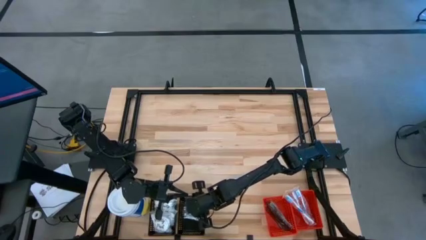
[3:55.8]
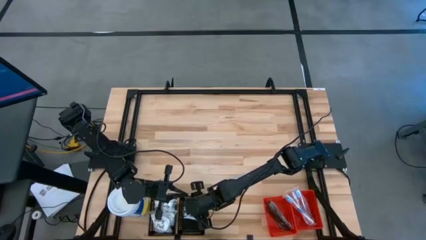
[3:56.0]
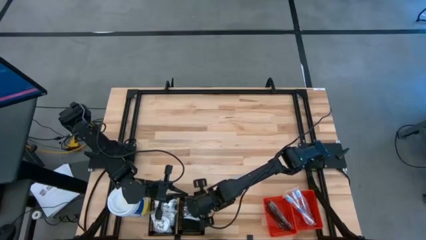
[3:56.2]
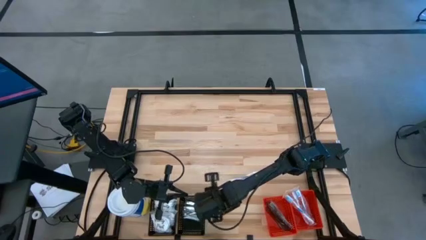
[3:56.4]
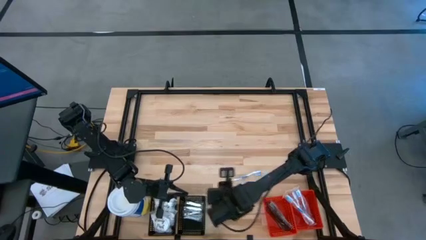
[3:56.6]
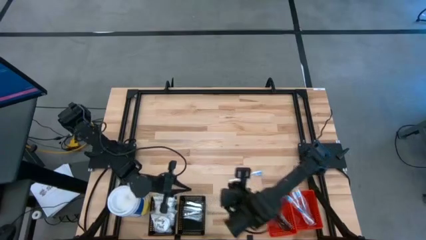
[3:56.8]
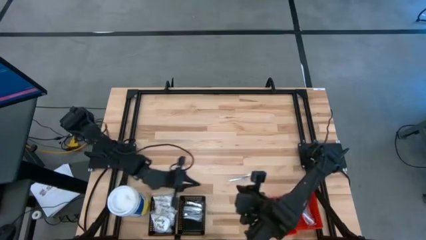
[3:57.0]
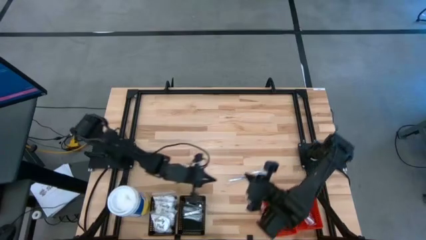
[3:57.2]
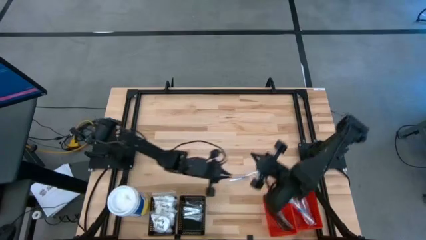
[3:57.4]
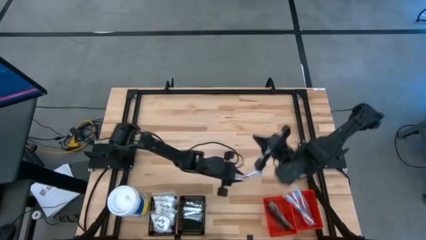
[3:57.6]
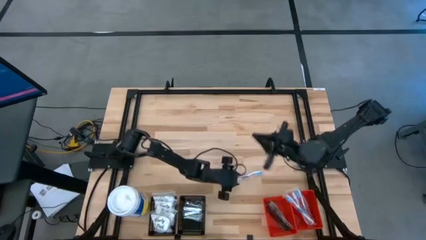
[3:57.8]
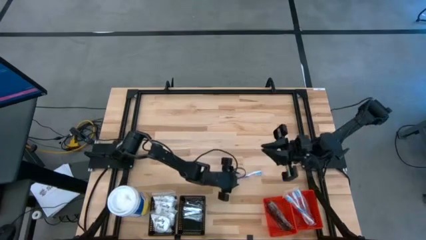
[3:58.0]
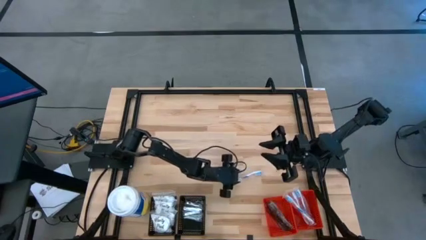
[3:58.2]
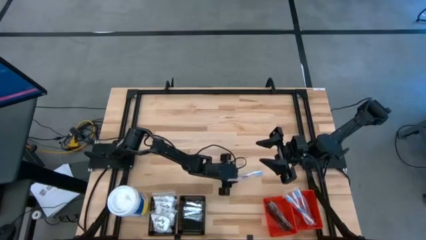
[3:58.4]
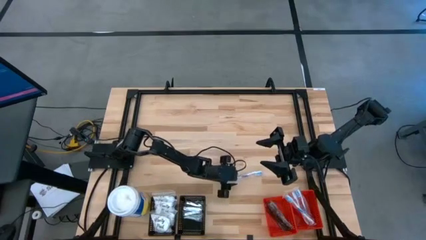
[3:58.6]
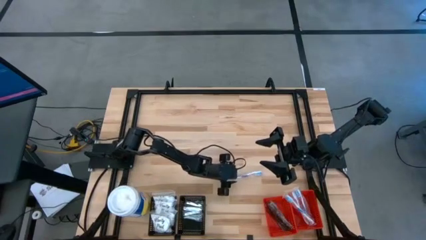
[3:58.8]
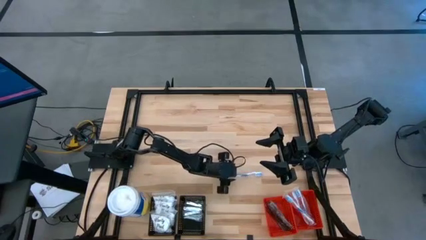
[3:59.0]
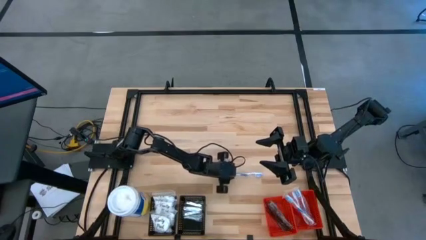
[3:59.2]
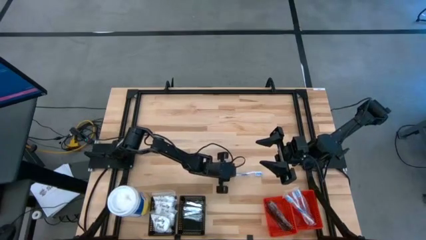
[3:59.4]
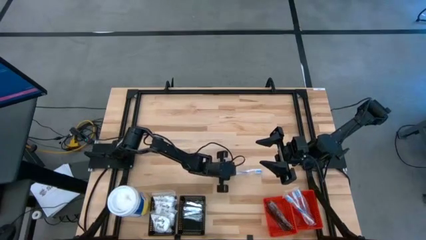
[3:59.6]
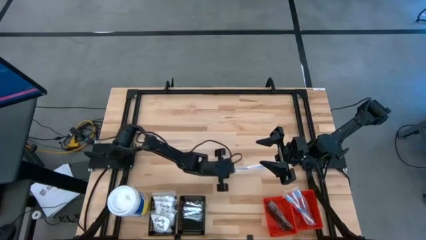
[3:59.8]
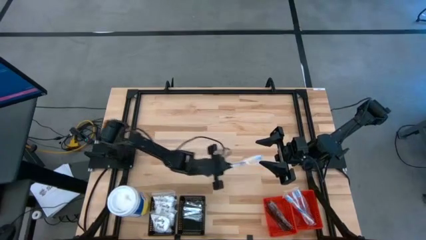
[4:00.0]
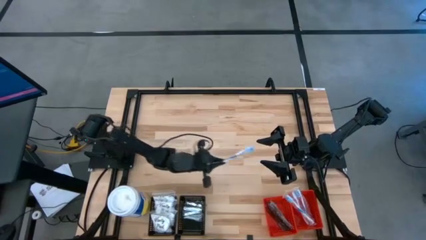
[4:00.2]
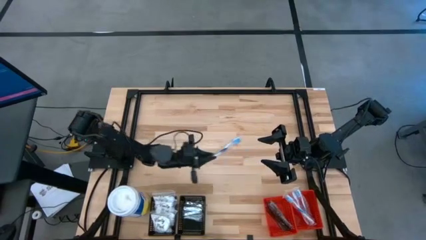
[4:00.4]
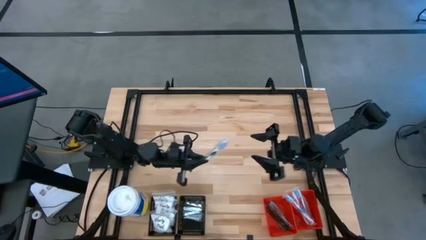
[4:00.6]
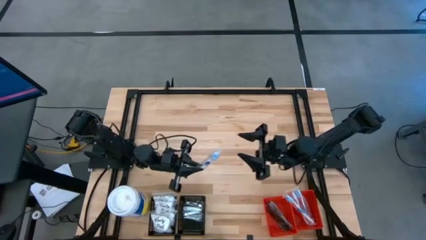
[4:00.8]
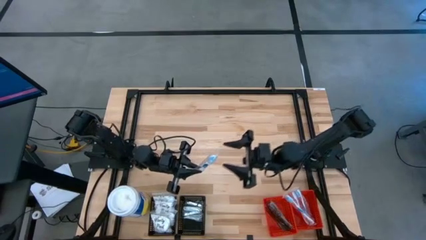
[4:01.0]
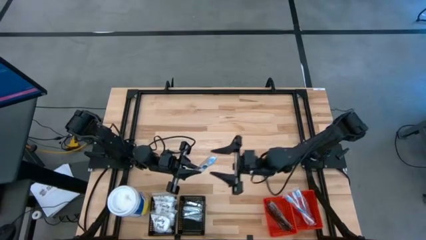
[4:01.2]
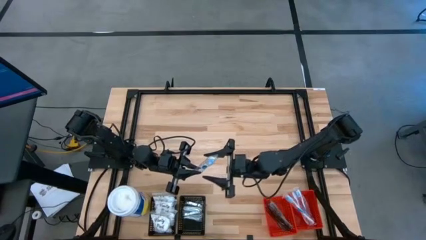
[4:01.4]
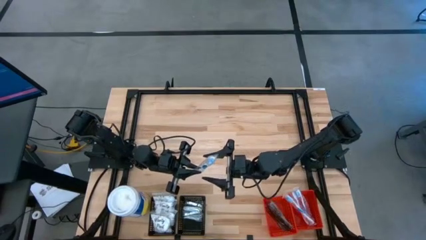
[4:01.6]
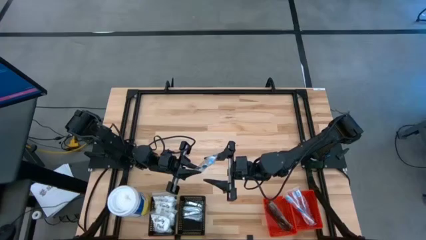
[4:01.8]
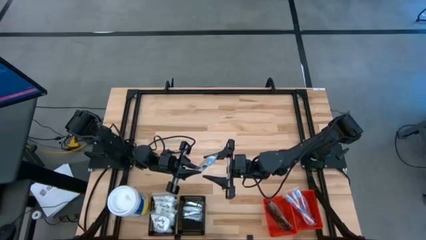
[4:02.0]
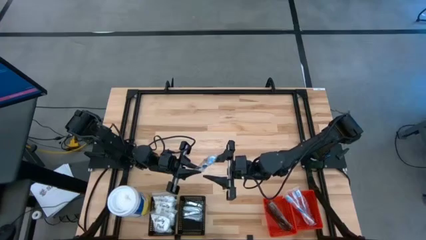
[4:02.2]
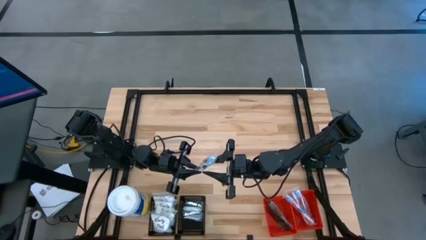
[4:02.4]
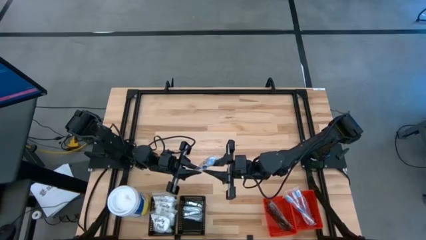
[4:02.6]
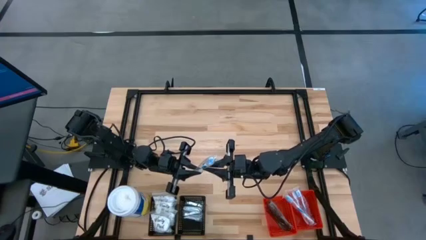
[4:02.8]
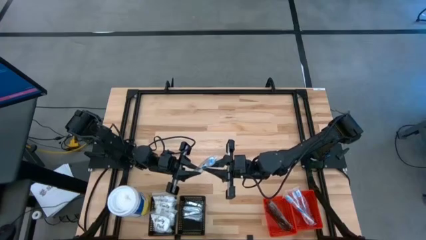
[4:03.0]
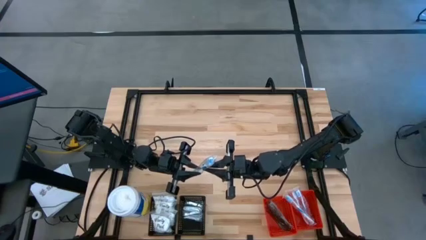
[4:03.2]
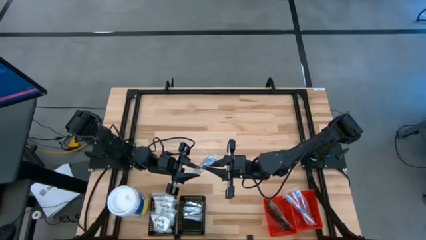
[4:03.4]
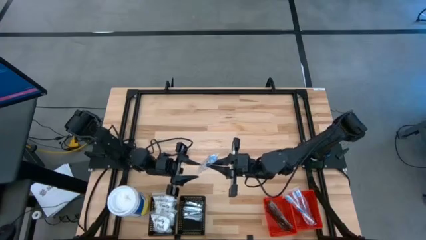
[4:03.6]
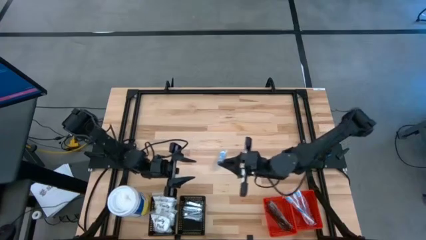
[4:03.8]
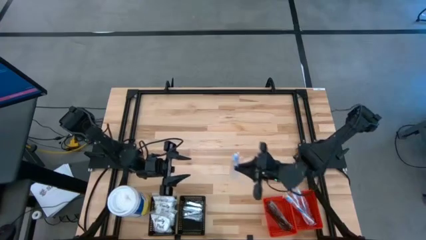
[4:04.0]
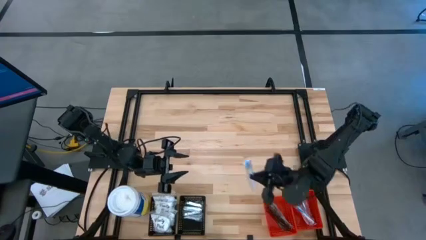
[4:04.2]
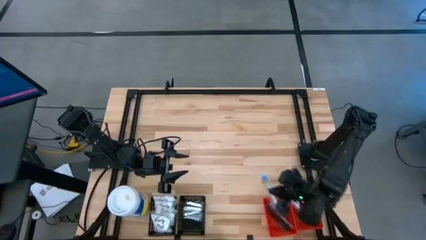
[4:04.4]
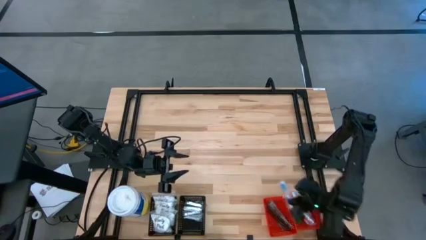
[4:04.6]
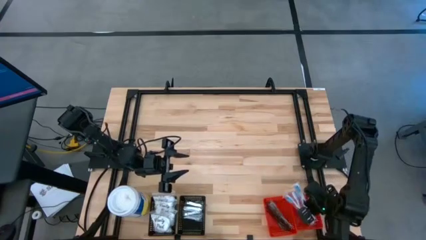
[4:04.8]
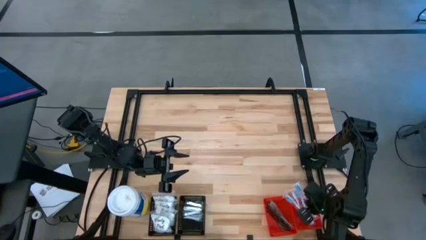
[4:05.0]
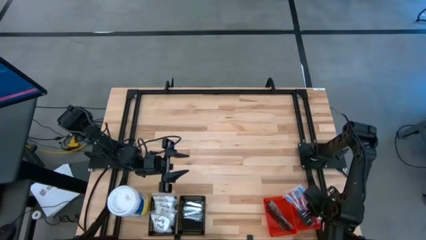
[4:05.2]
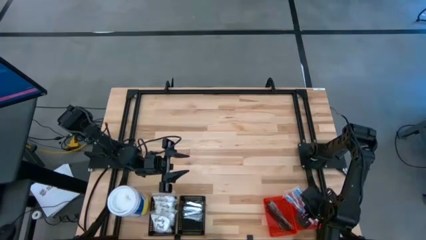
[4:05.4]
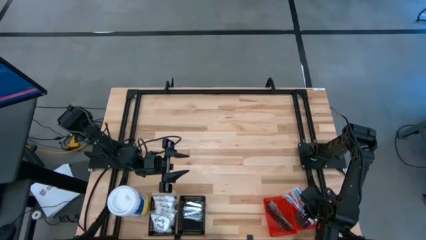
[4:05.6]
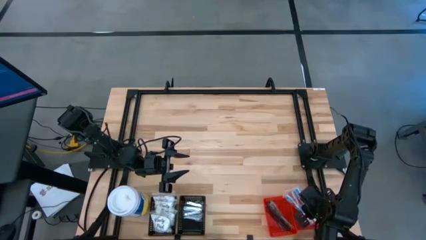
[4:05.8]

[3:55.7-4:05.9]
Task: Pick & Place Travel size toiletries
Put the blue toothbrush into the right red bin

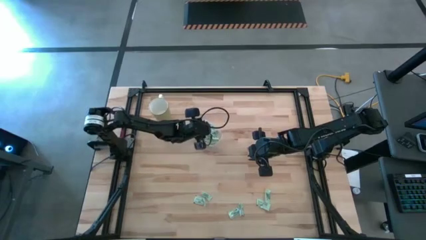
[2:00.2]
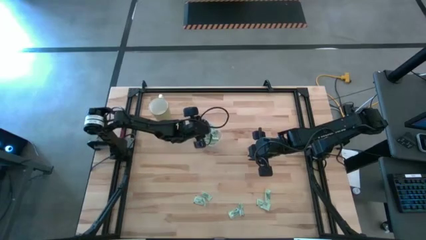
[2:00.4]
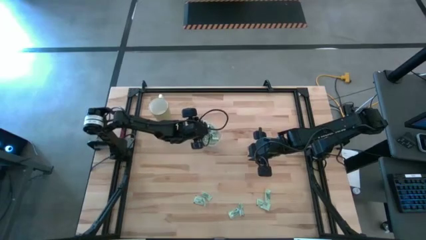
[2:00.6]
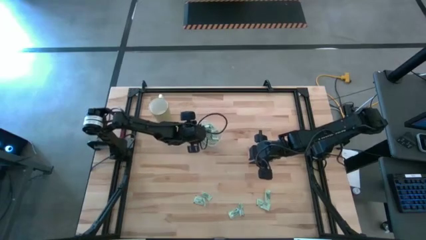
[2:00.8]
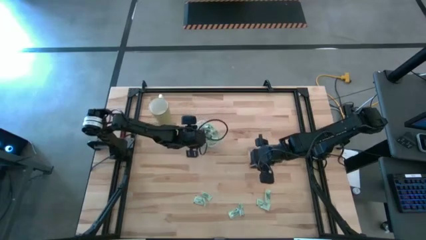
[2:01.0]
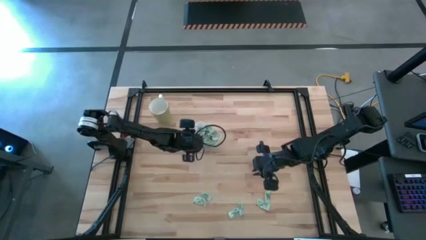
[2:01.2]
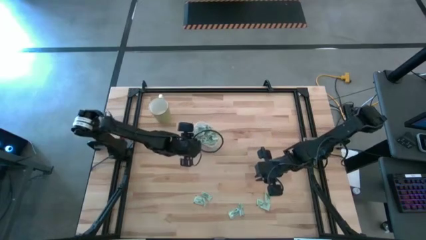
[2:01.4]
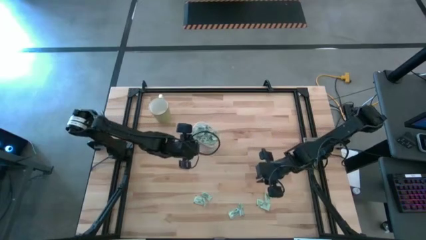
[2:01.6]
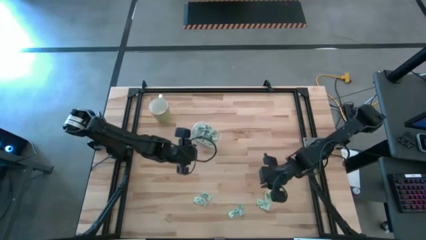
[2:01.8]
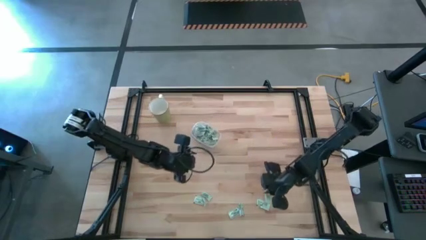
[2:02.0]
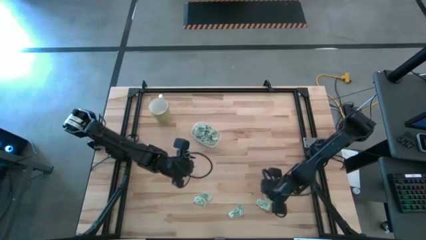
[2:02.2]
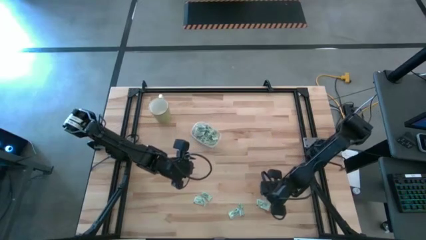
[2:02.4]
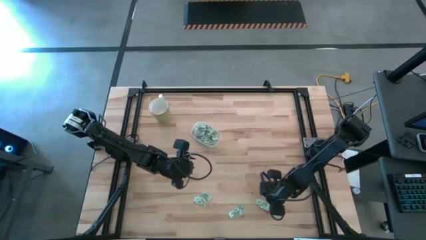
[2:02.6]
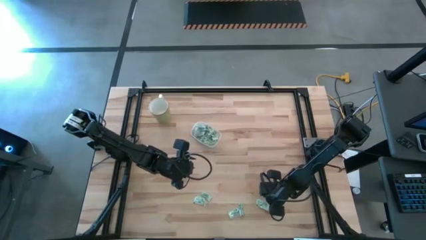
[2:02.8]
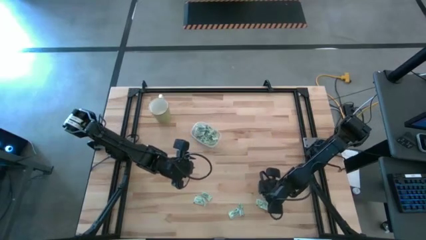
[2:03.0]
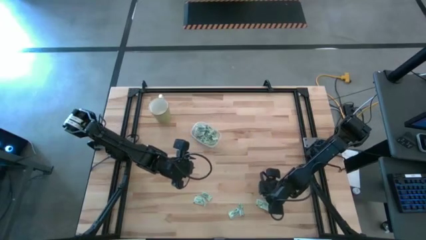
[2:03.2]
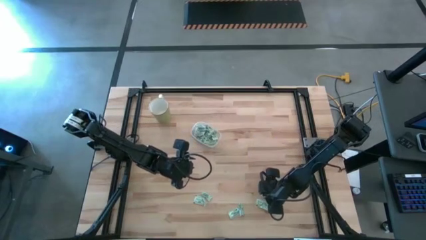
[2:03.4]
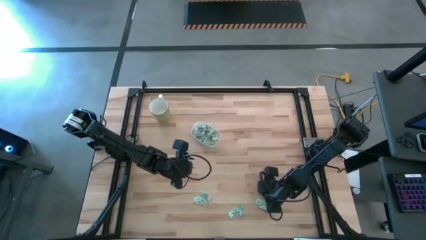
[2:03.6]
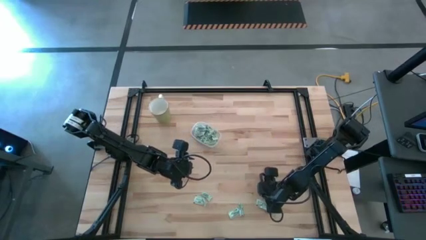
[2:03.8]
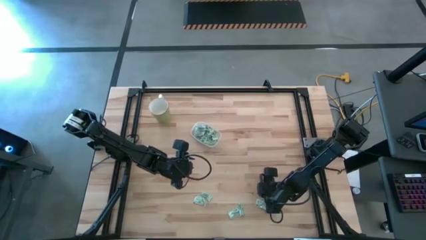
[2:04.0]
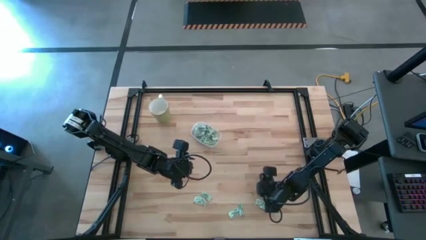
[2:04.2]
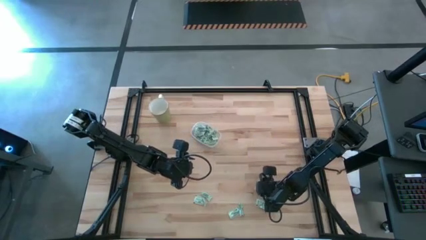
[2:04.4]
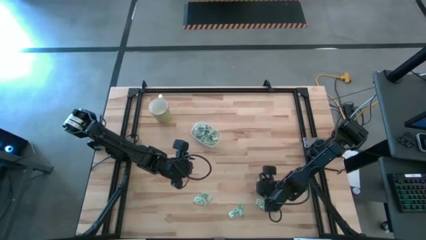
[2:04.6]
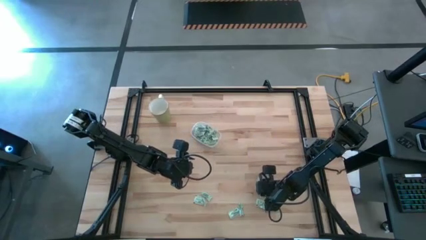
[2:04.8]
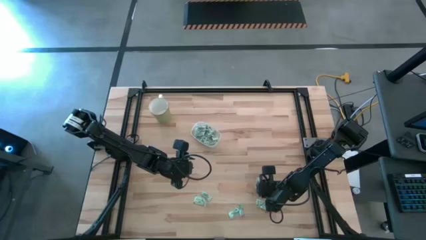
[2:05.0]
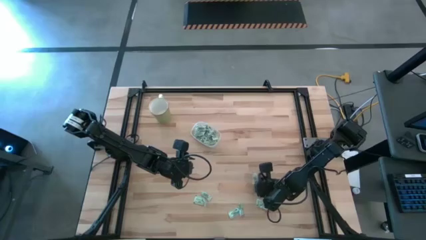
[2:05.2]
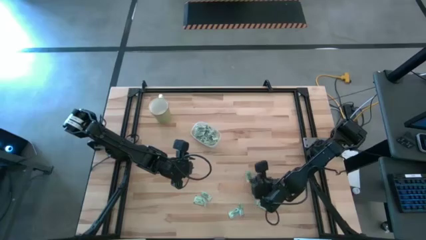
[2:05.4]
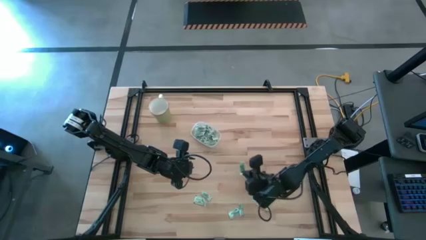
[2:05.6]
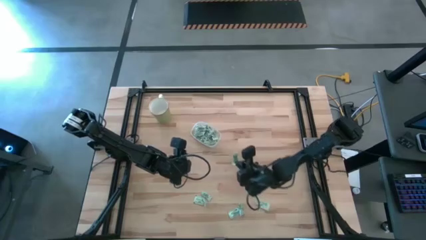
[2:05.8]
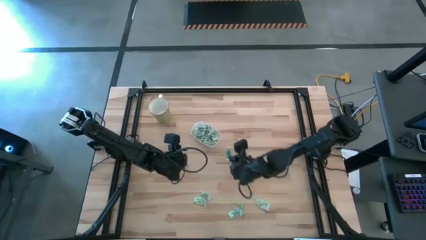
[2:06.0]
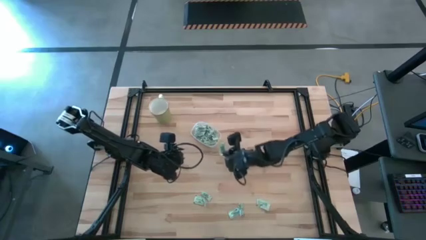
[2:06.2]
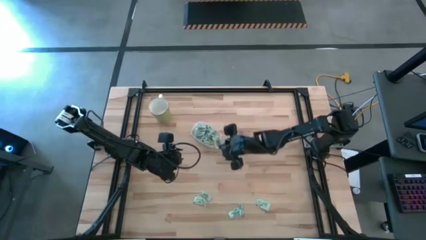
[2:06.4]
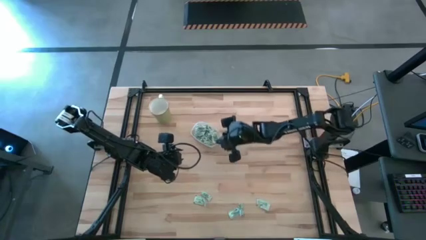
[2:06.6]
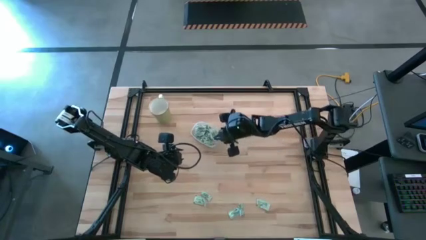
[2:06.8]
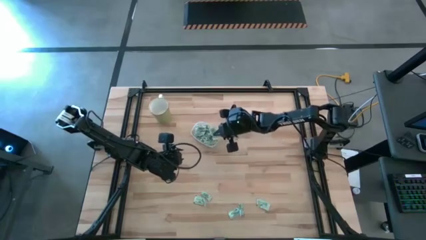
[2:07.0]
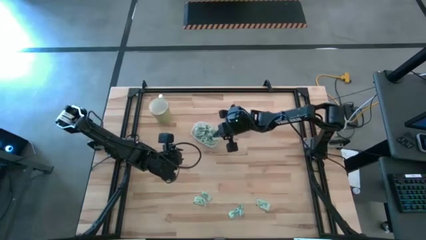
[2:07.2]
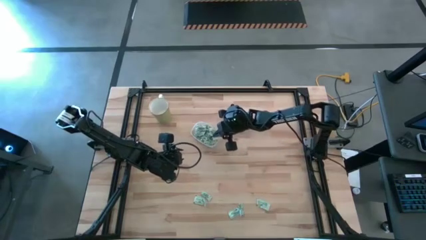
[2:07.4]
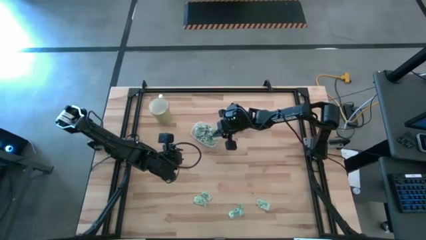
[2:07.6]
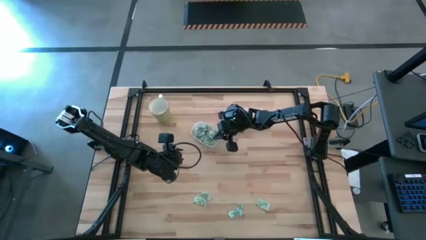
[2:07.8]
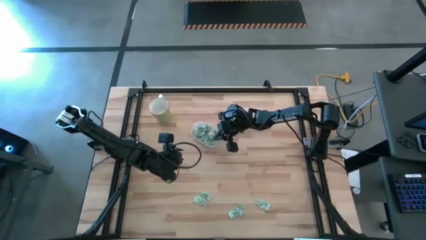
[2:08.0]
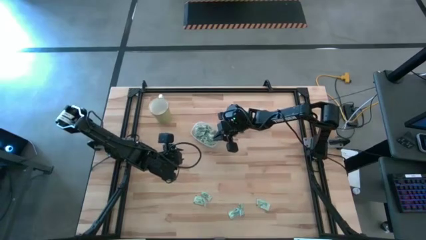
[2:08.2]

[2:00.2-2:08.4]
Task: Pick and place Stevia / Truvia into bins
Put the stevia packet into the transparent container
